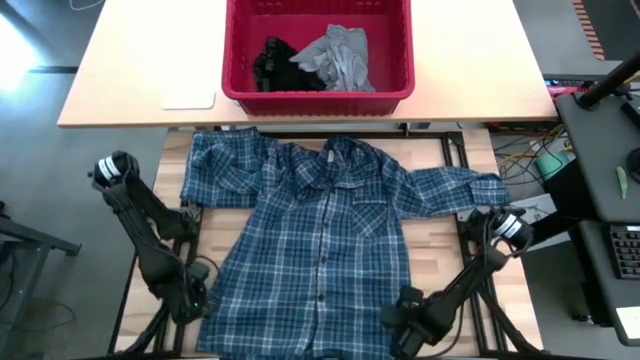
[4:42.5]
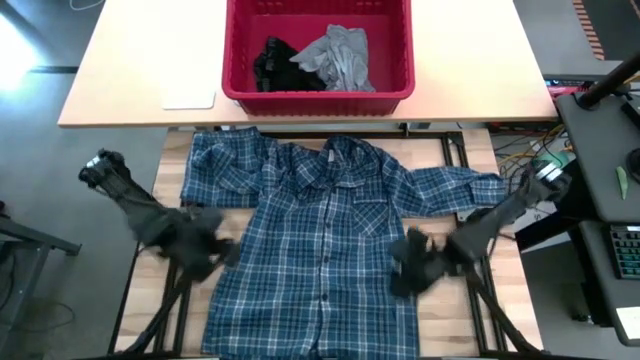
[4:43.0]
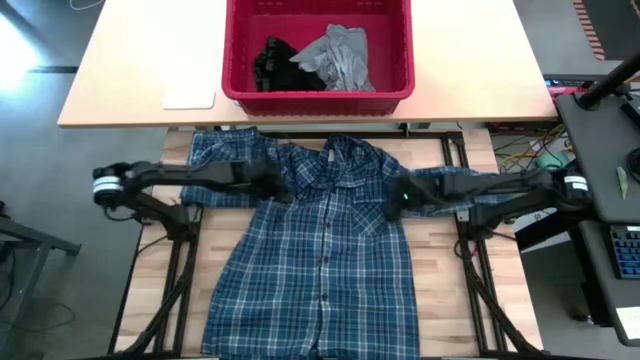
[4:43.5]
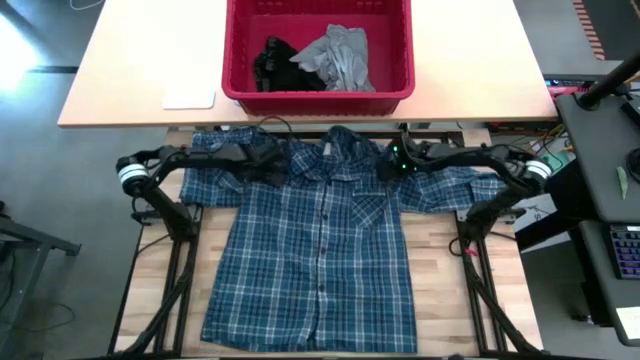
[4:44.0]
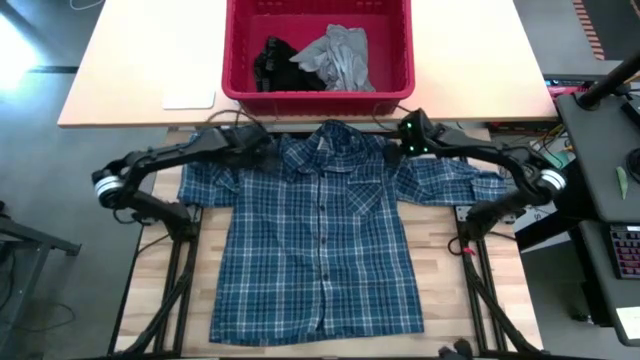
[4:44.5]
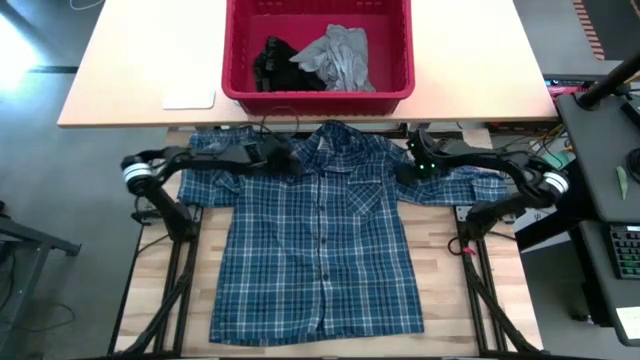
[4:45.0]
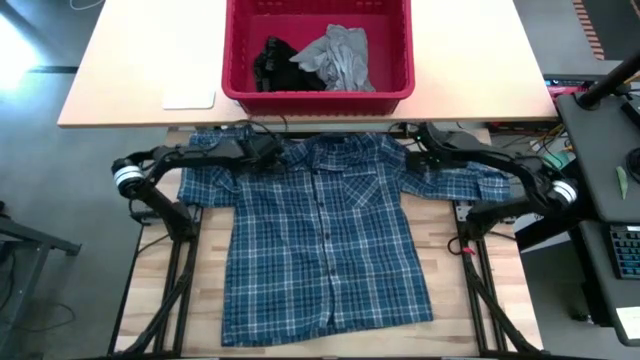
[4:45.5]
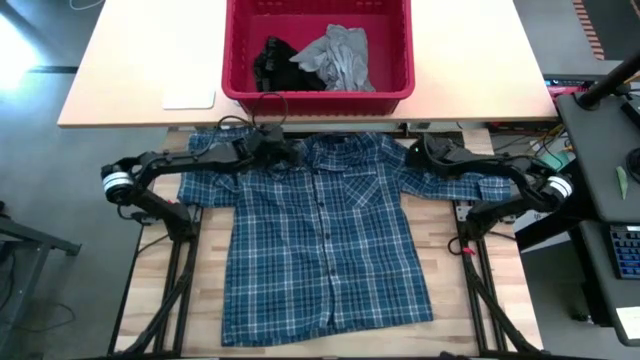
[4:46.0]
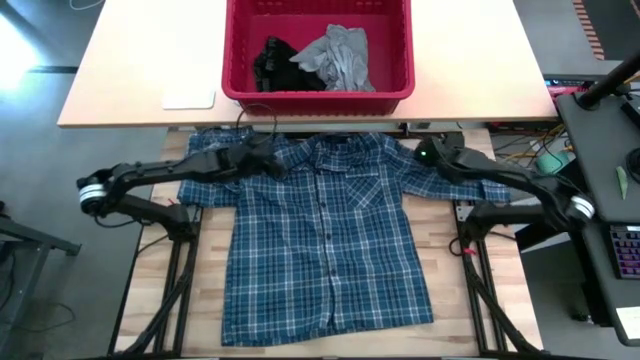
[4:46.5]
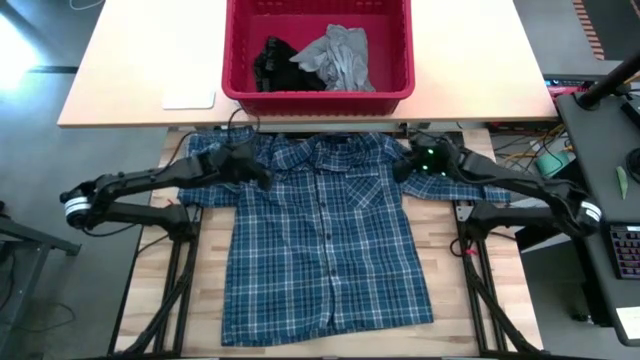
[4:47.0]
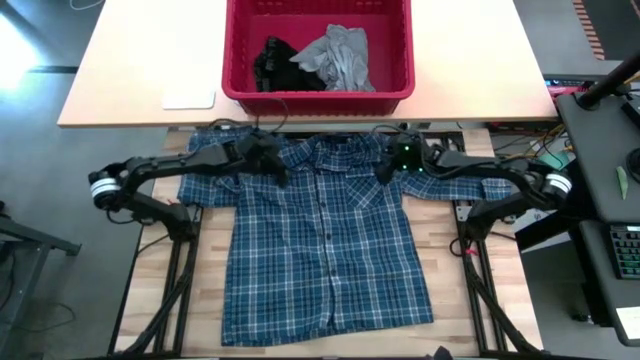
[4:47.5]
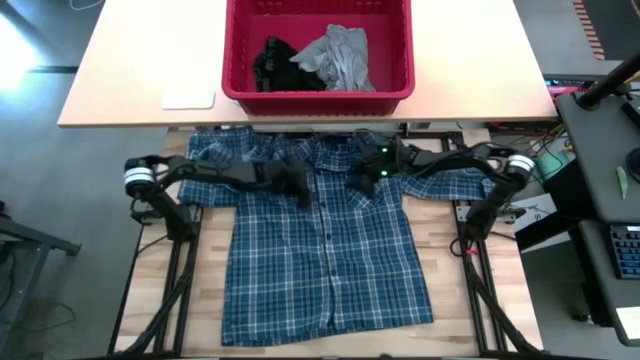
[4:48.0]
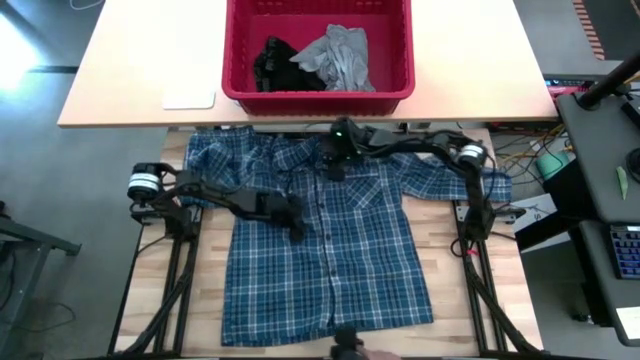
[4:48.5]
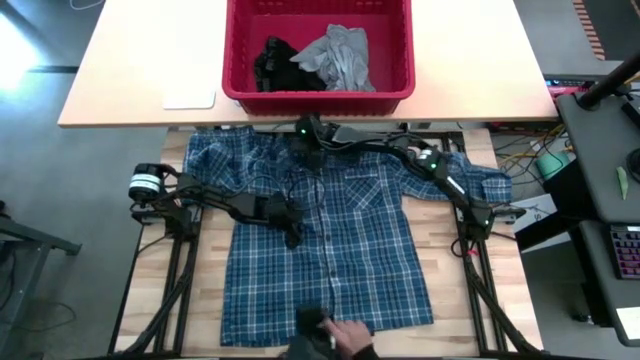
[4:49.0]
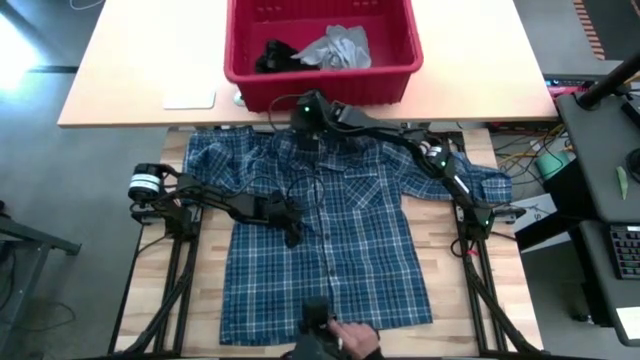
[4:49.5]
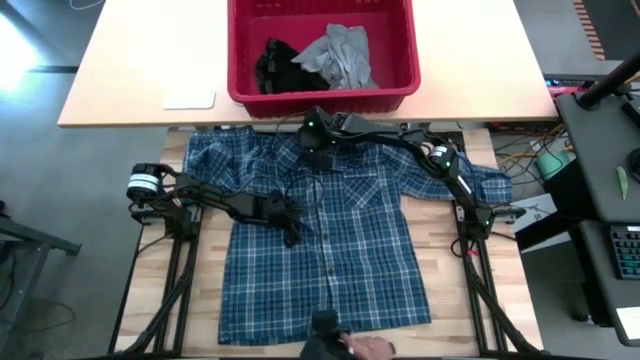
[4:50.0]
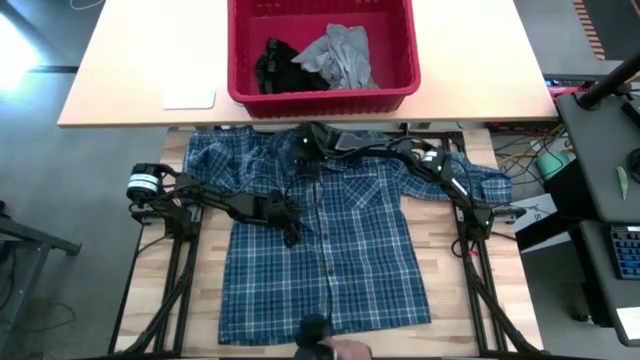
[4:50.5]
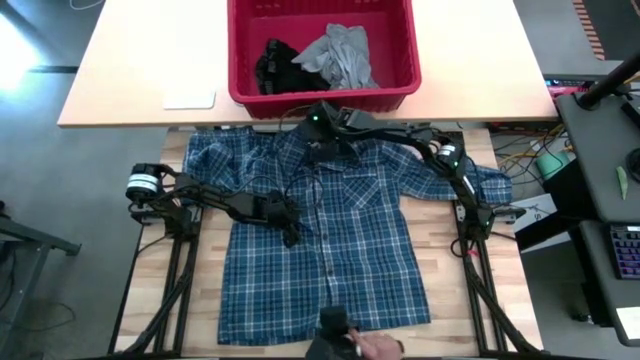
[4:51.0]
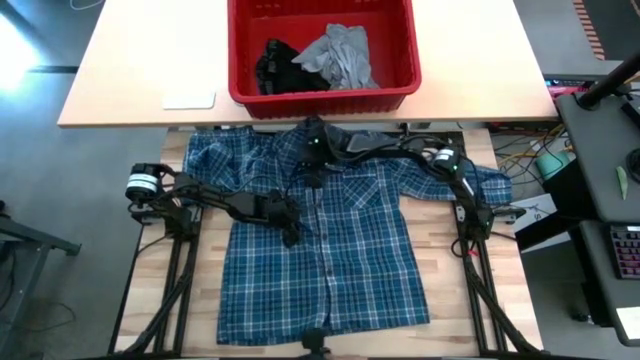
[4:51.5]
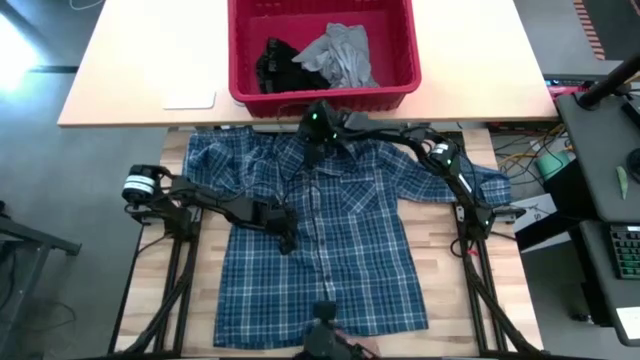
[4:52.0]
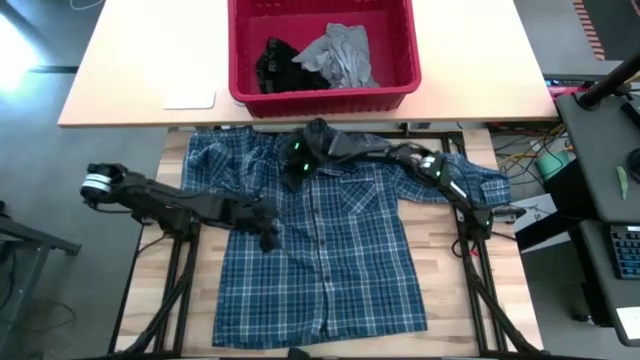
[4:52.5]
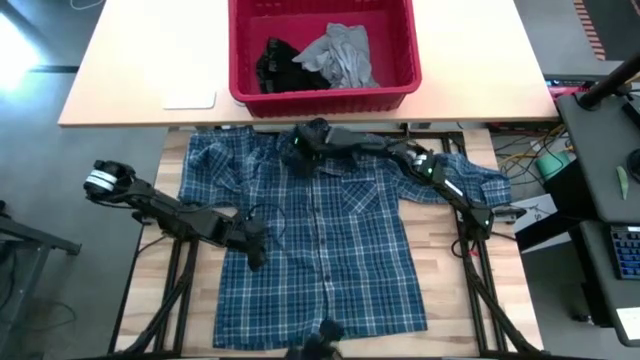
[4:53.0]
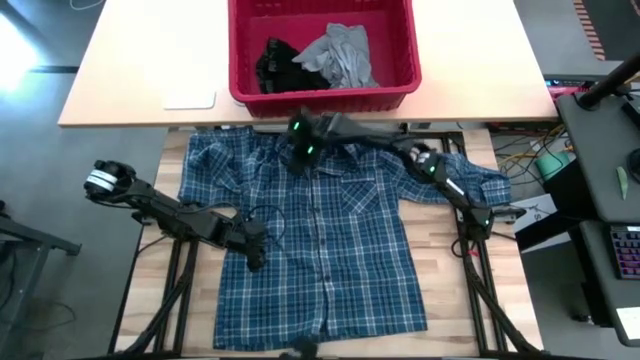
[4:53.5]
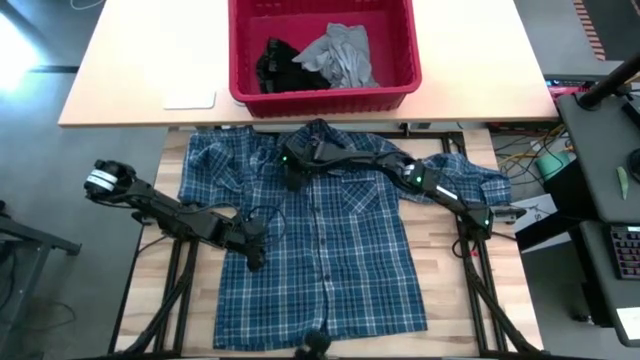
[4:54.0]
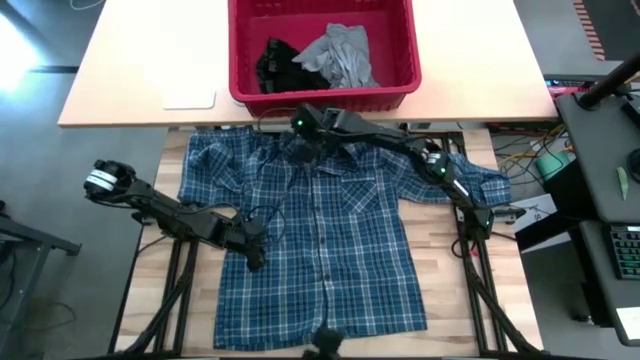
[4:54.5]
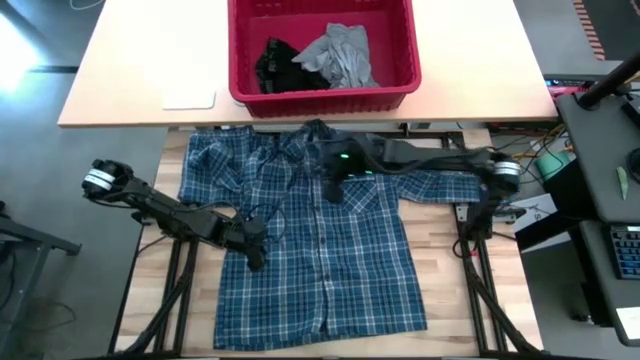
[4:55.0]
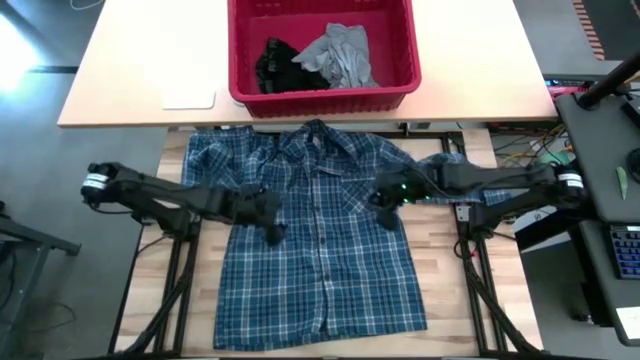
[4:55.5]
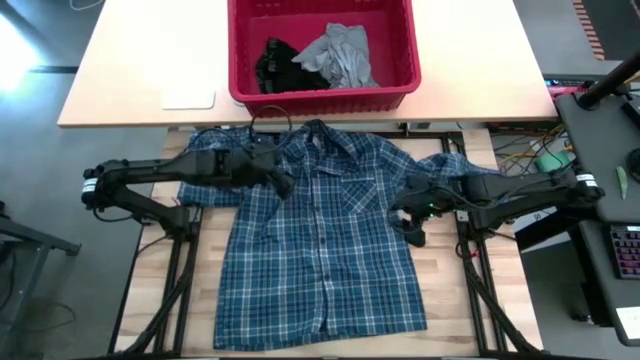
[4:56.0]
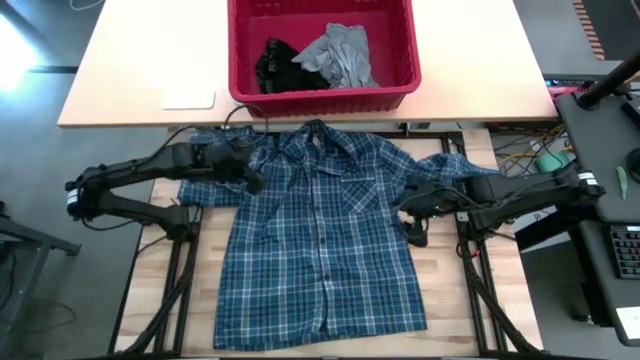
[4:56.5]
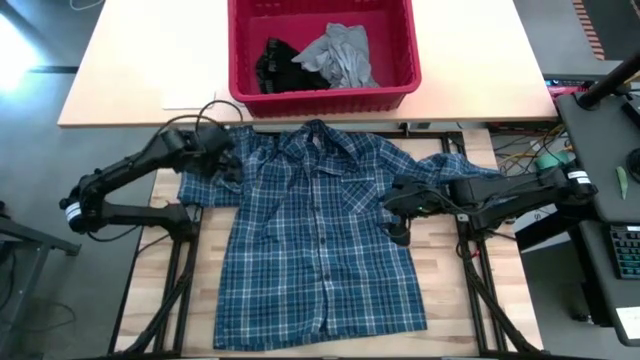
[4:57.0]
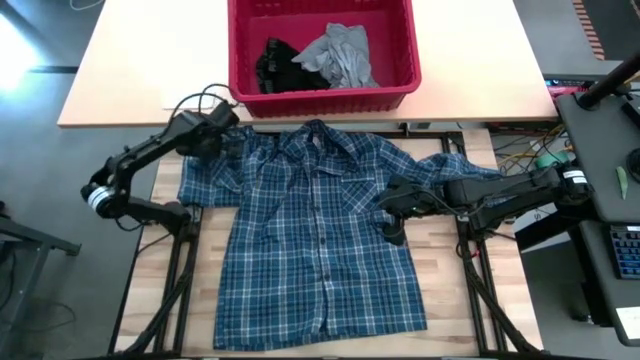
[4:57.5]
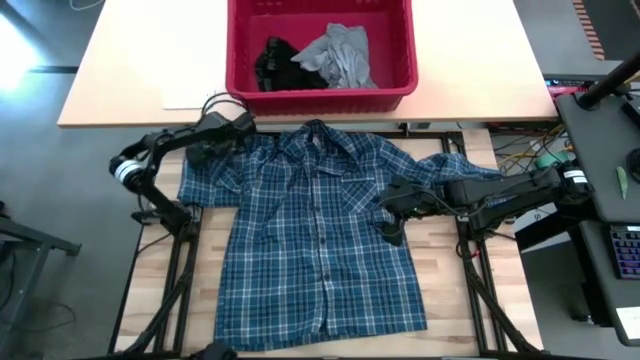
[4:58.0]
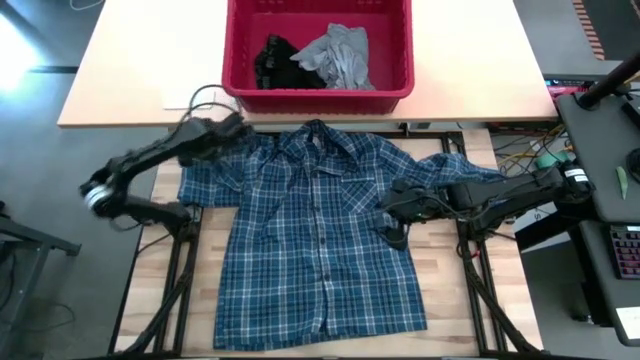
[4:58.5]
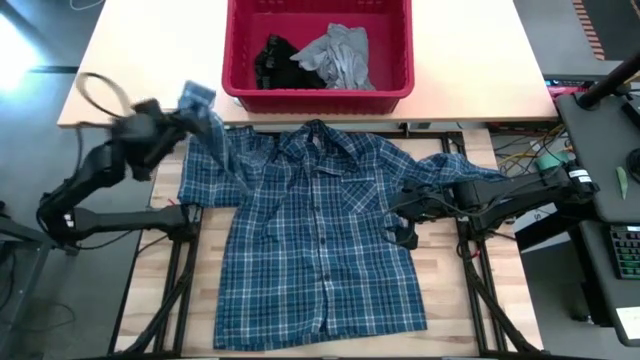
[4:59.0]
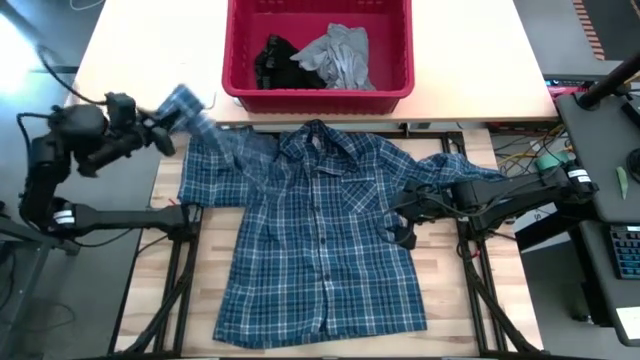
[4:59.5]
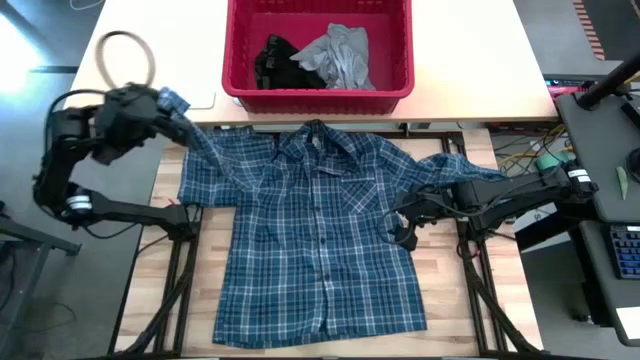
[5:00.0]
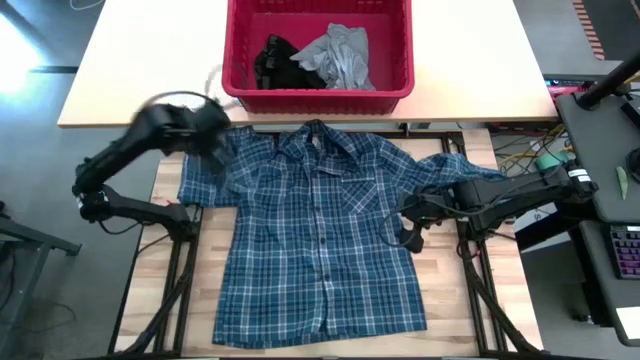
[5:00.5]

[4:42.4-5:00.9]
Task: Fold Laundry from Bin
Fold the blue patterned long sleeve shirt

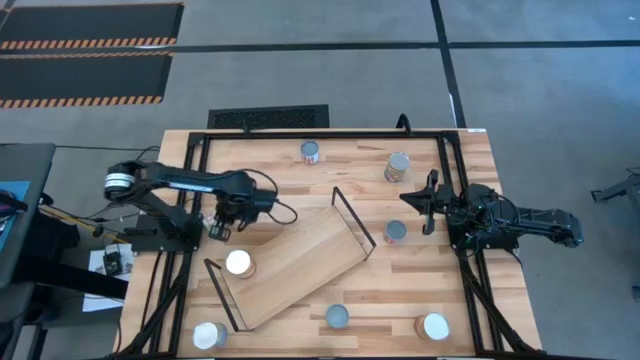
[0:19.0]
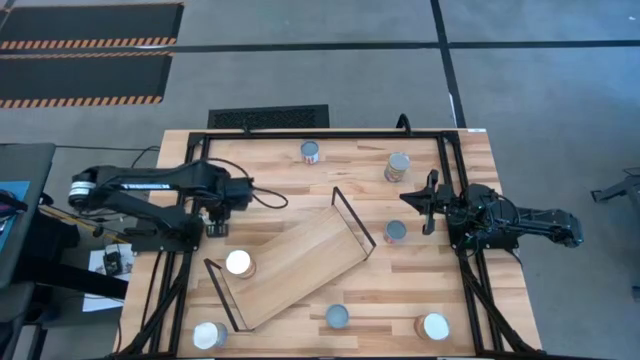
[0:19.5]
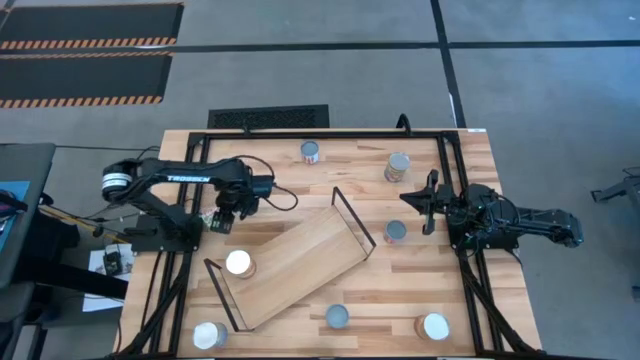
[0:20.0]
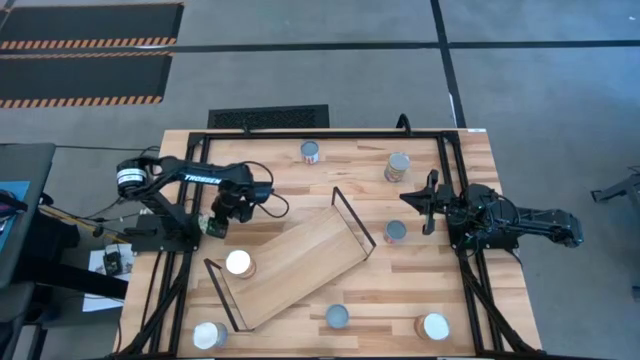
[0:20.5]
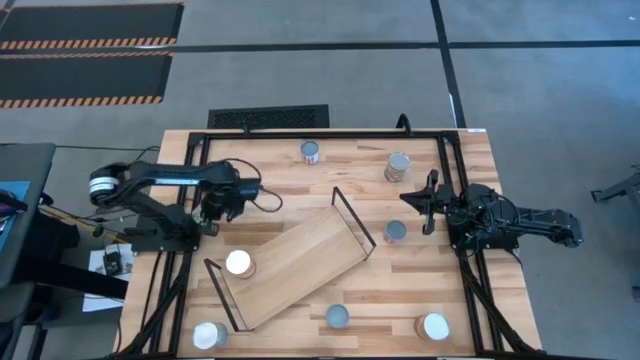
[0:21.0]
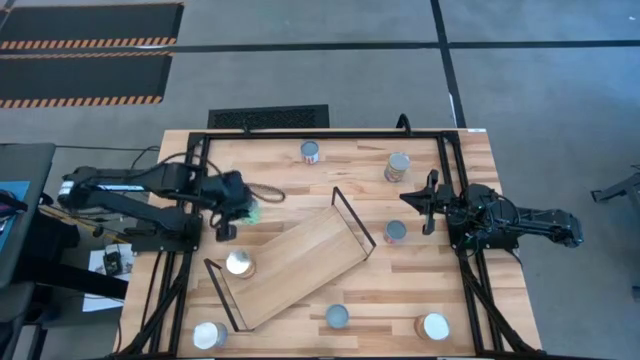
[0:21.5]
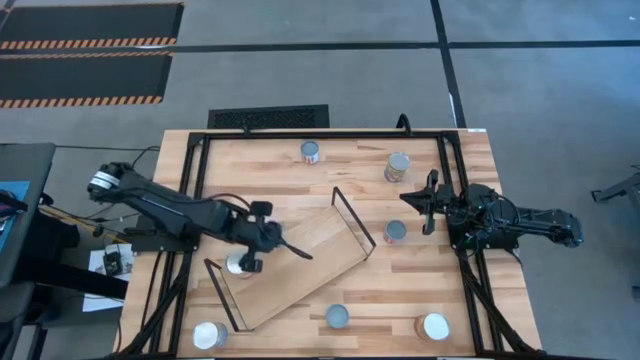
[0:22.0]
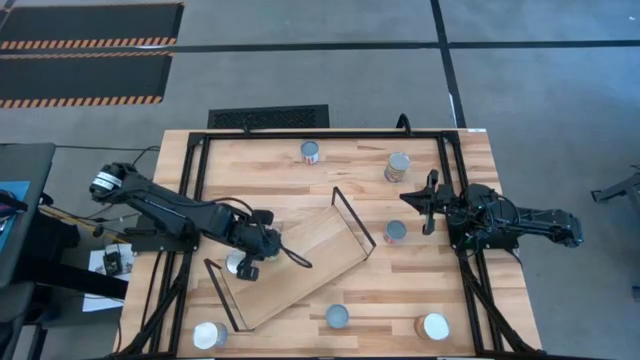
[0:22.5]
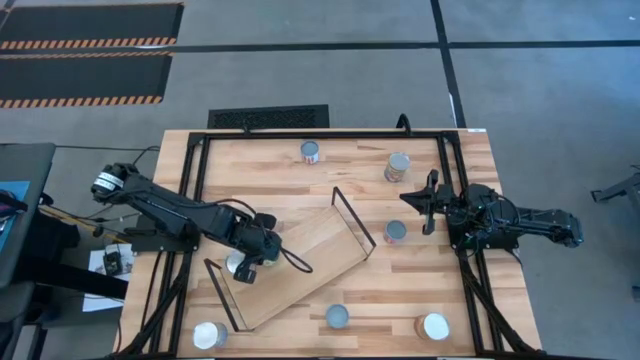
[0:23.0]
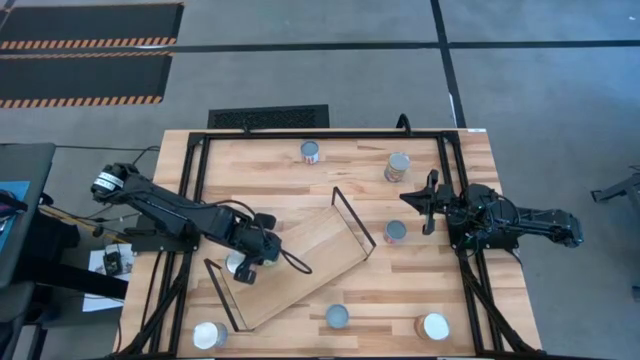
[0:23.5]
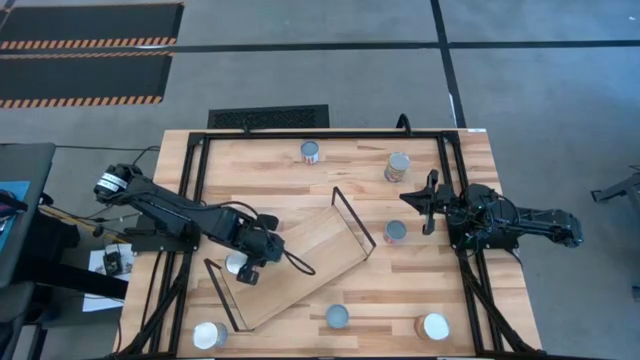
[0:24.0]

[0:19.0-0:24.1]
Task: Pick and place cans onto a shelf
Put the canned strawberry on the shelf
